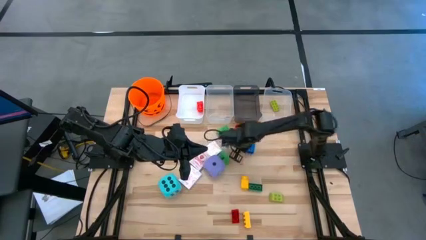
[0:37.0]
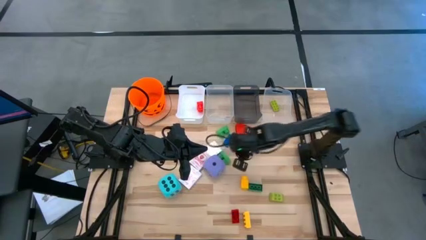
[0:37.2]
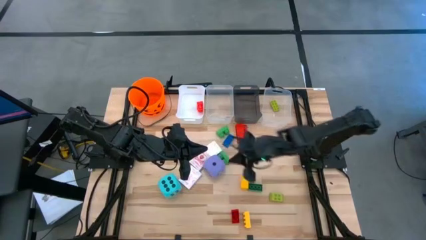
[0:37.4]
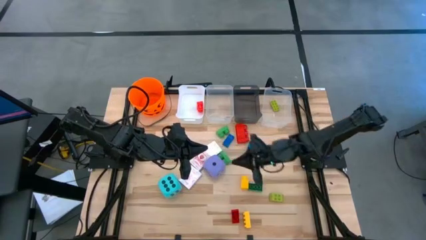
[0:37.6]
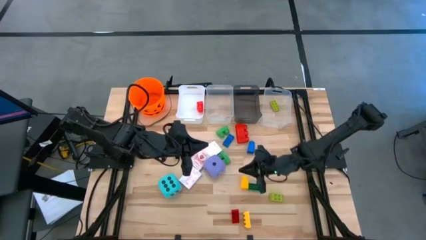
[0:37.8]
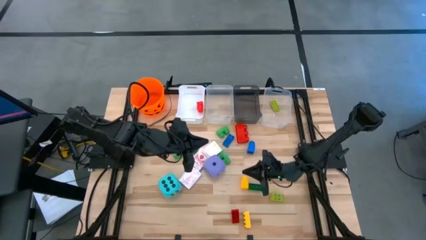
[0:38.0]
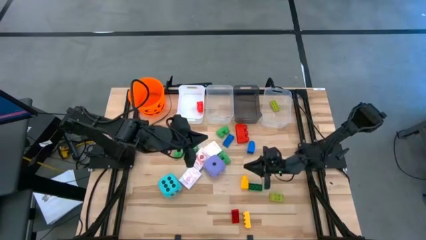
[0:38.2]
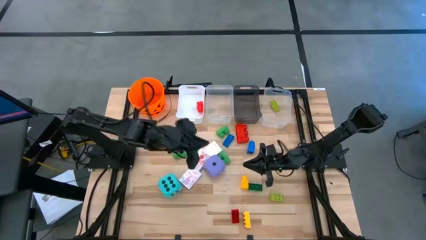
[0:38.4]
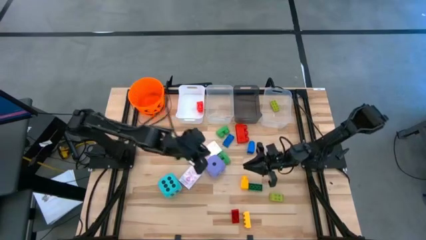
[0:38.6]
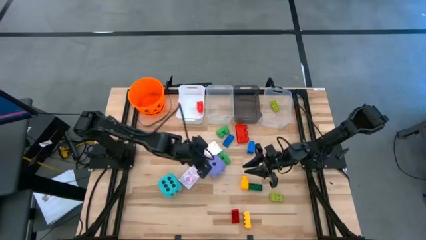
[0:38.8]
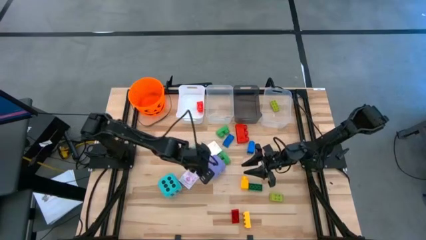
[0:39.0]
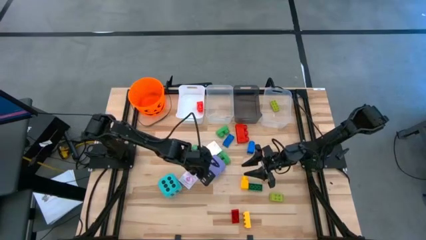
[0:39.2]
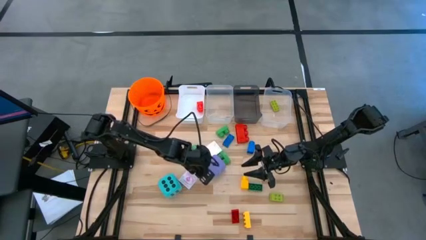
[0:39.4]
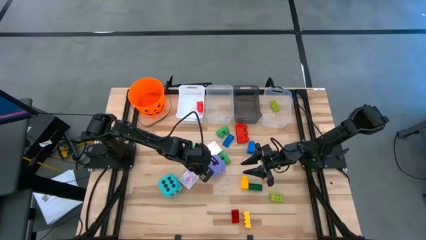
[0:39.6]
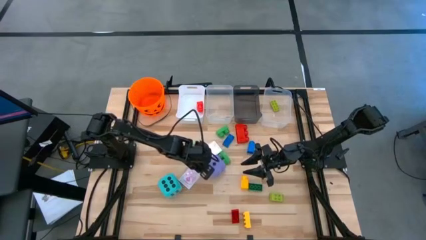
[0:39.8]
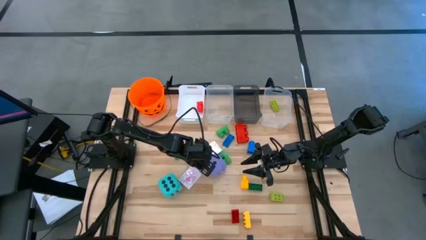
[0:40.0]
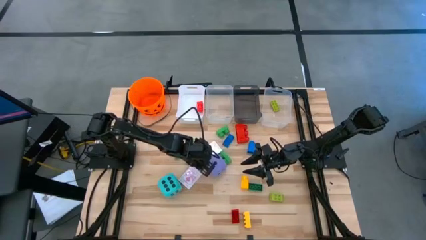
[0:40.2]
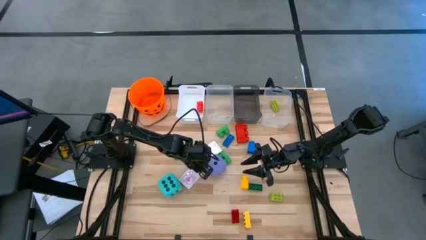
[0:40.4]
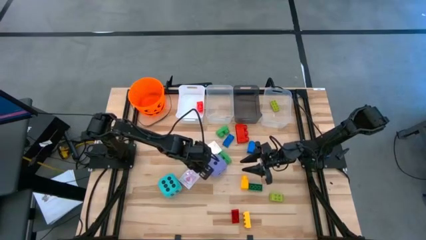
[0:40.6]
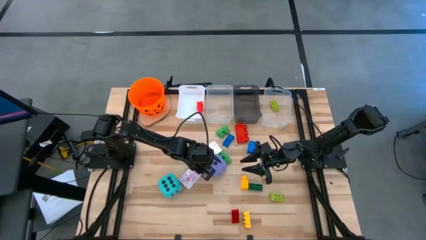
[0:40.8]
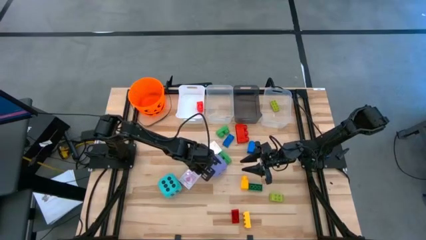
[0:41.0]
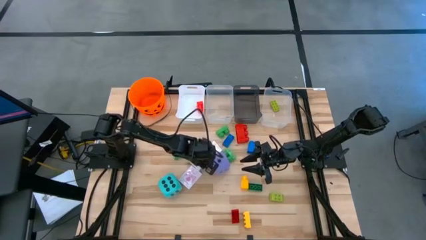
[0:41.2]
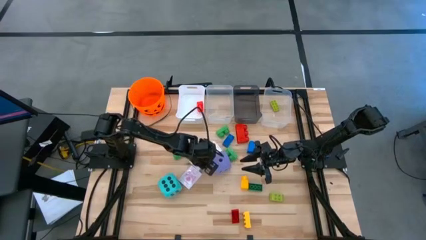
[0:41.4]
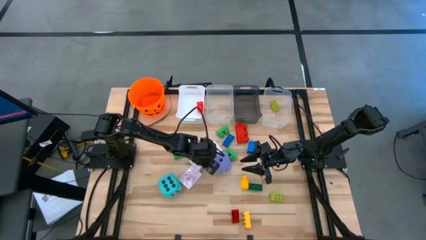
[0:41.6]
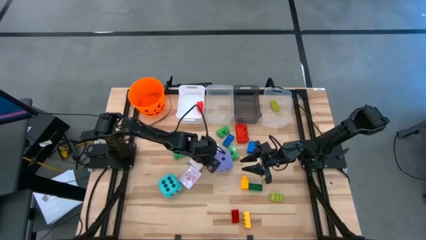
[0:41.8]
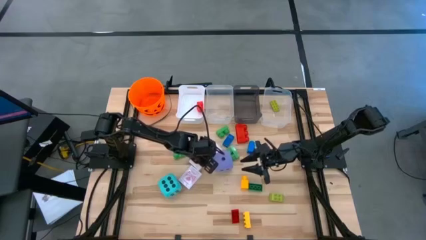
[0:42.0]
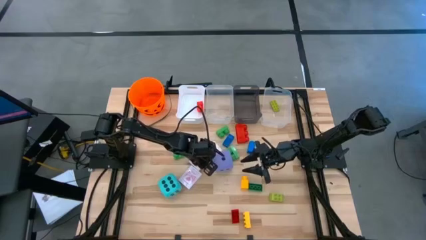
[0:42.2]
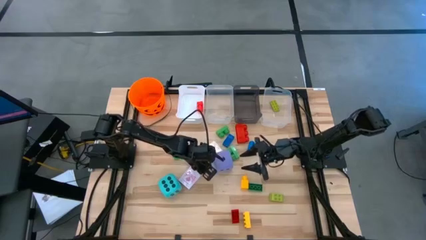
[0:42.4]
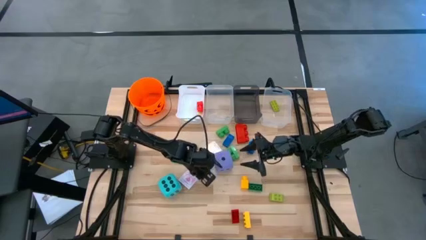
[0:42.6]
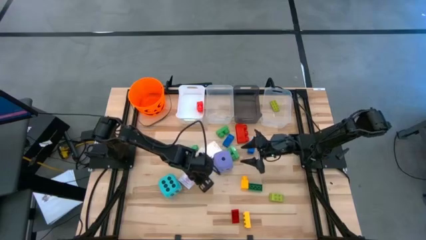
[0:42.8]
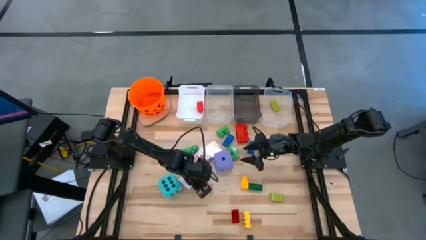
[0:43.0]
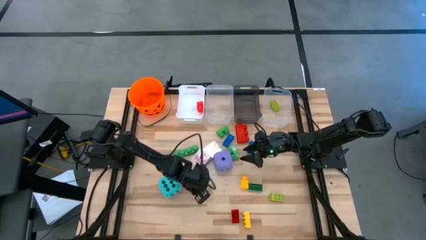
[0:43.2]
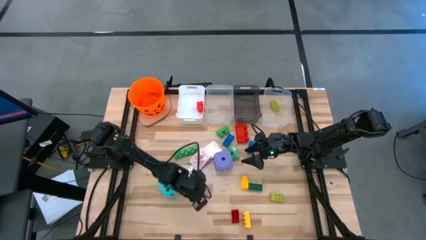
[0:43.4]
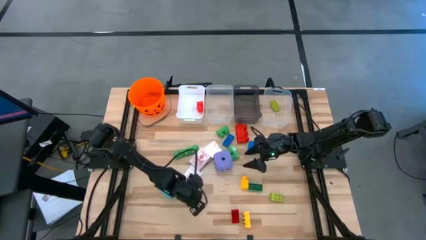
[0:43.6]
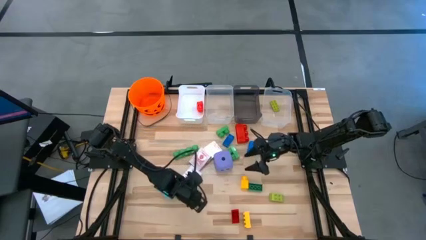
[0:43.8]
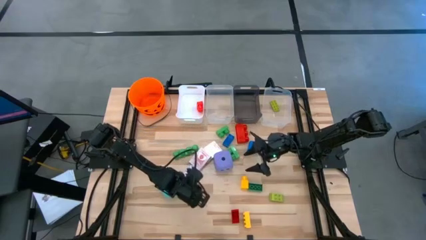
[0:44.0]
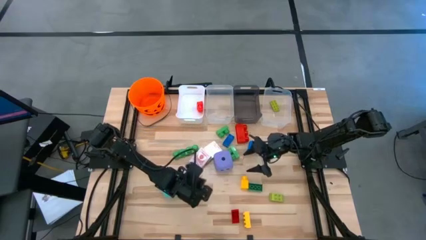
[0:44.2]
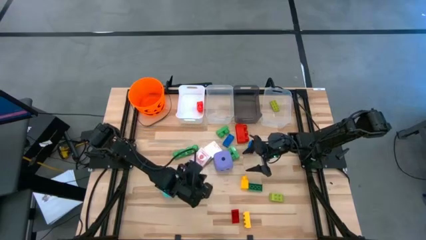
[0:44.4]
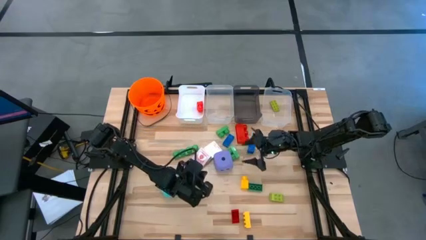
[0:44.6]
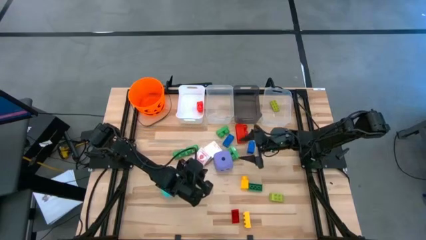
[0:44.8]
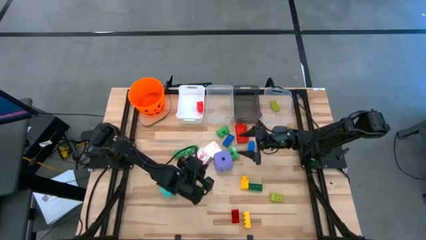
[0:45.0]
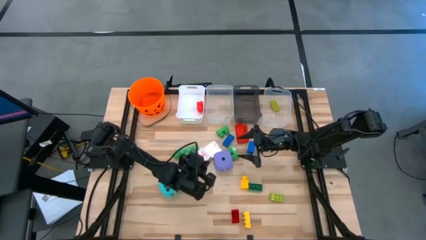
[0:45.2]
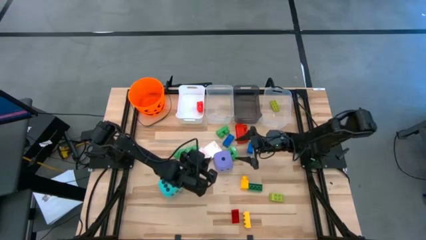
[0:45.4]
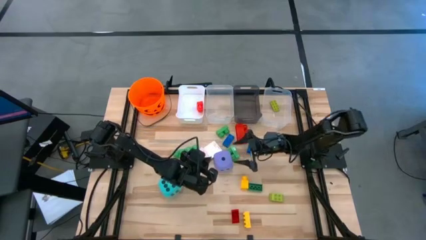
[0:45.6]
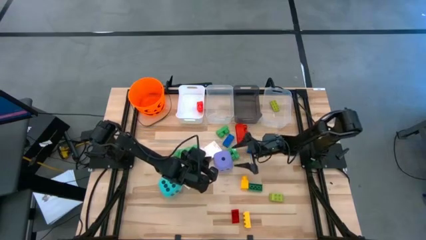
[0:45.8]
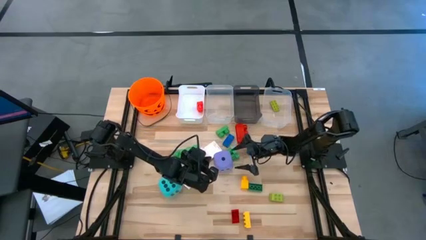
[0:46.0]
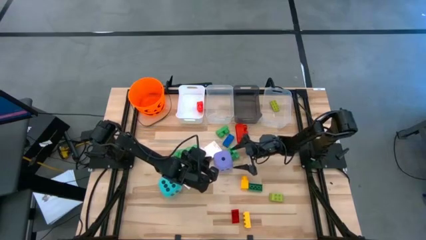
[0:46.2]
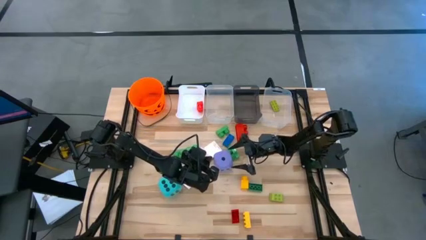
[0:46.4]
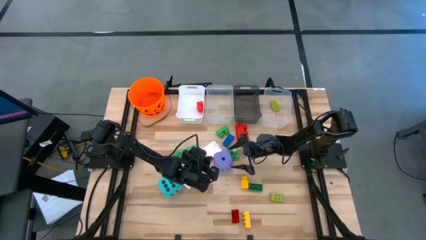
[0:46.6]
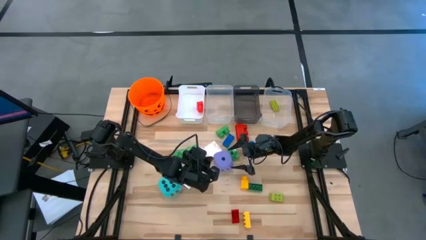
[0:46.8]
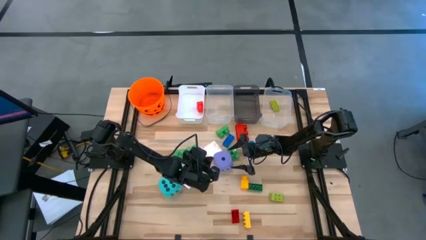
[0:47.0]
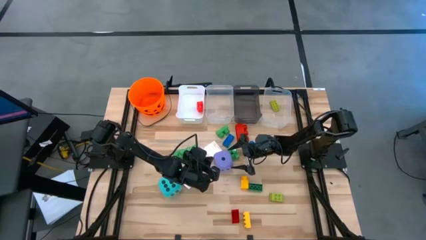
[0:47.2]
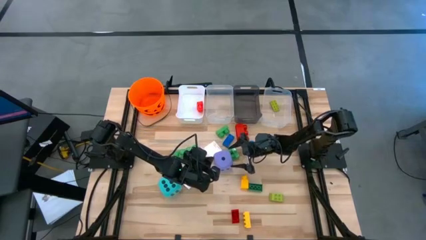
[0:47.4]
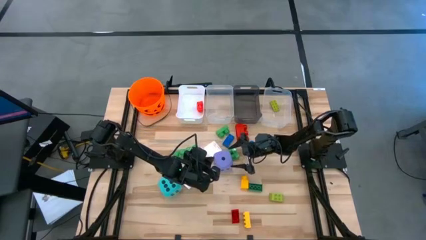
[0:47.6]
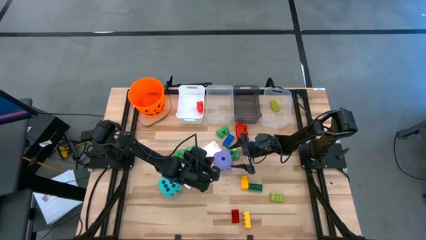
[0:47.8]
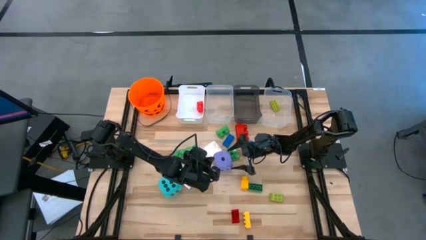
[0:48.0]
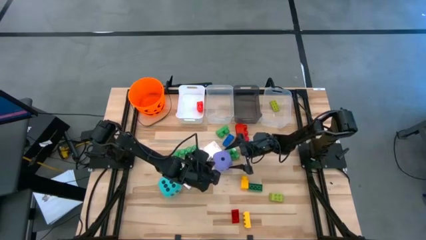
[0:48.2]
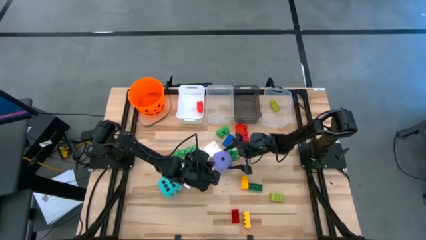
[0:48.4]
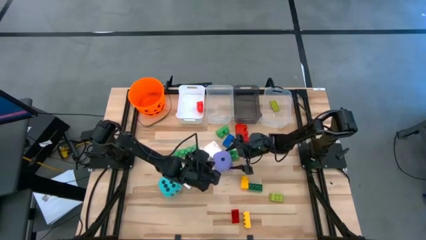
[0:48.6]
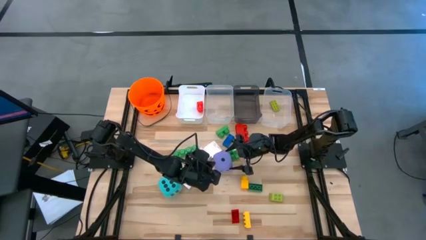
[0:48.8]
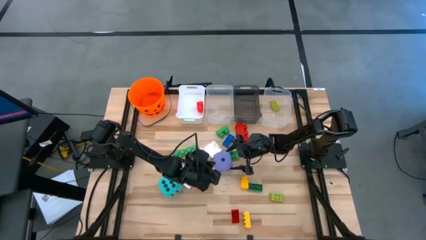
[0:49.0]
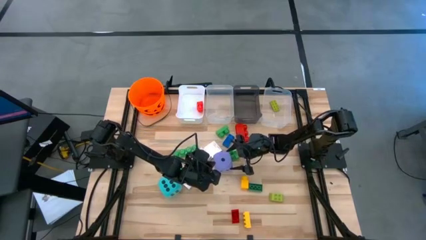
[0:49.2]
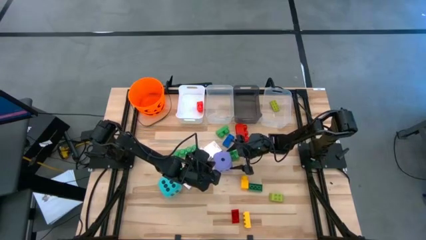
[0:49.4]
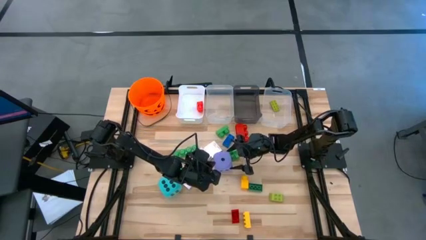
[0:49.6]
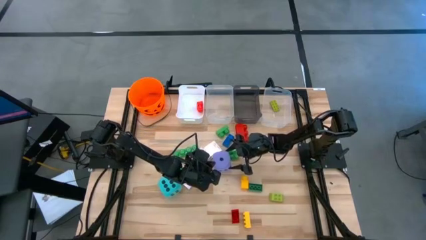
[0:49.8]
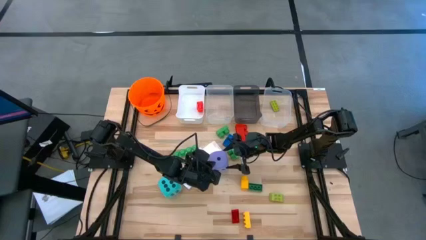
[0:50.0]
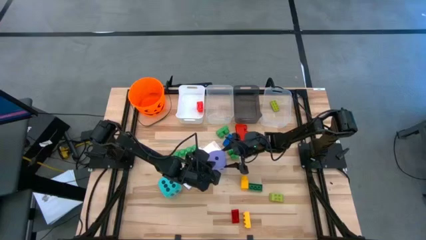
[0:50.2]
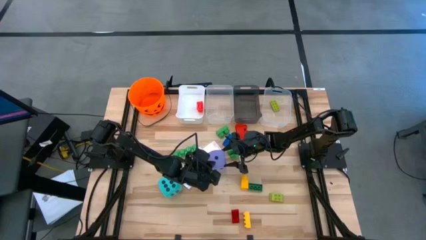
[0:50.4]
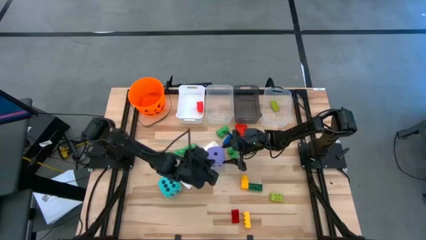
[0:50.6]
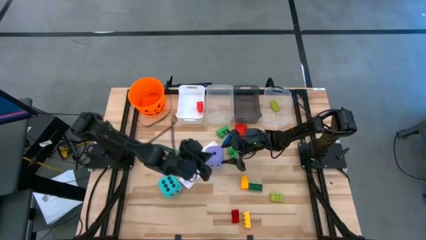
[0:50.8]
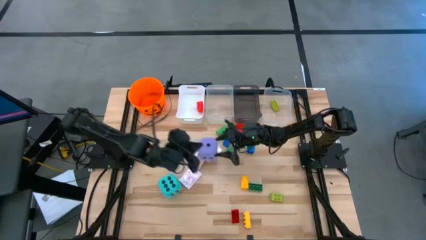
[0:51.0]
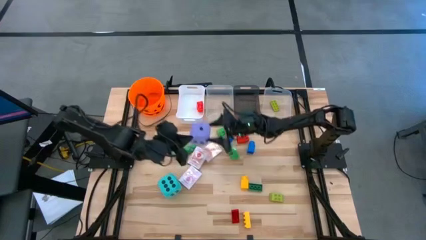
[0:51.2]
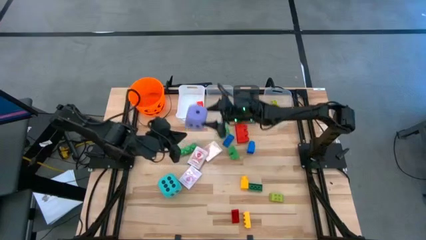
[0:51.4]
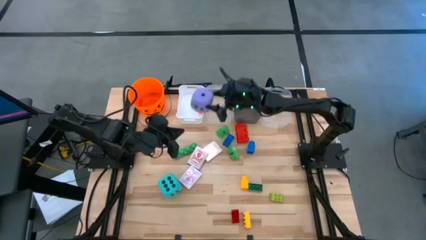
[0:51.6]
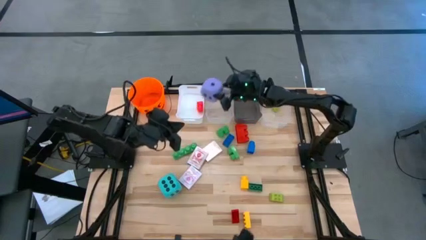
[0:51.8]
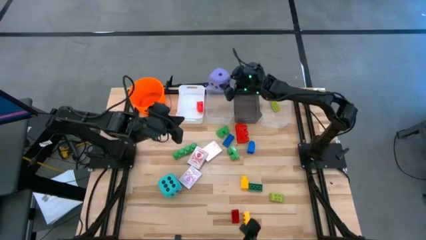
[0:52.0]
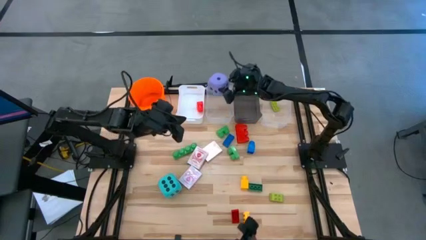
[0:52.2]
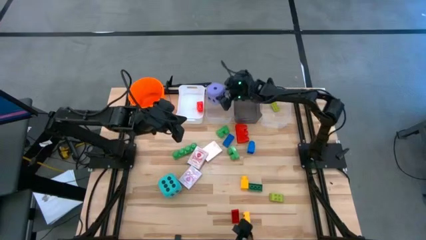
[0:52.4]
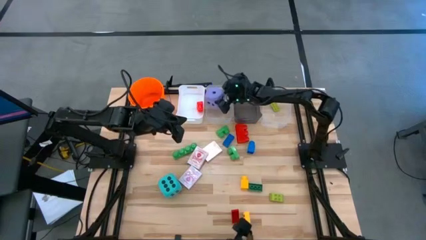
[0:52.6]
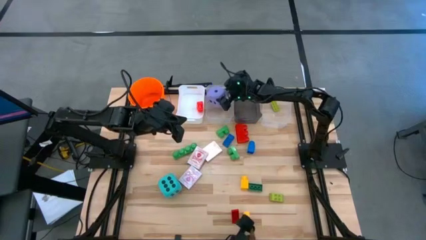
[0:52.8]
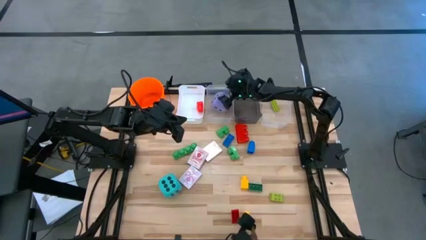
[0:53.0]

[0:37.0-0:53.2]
Task: Pick & Place Toys
Put the purple dice into the left transparent bin

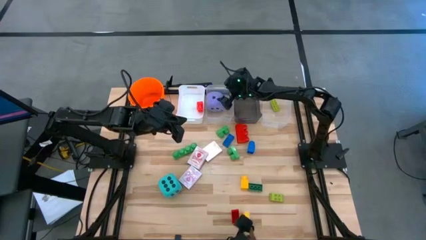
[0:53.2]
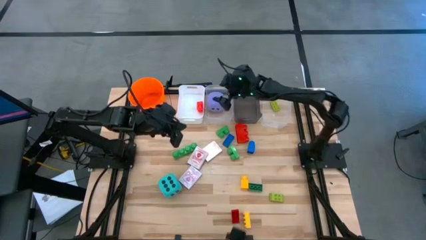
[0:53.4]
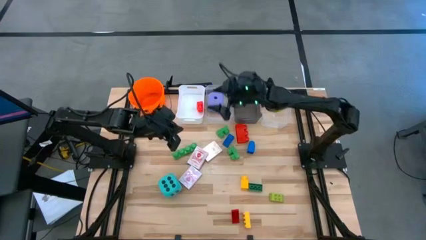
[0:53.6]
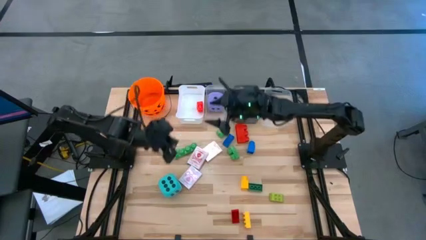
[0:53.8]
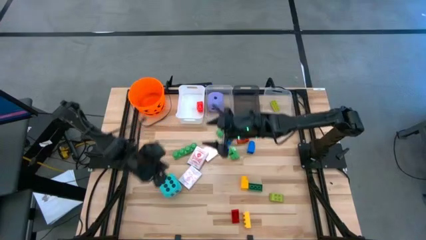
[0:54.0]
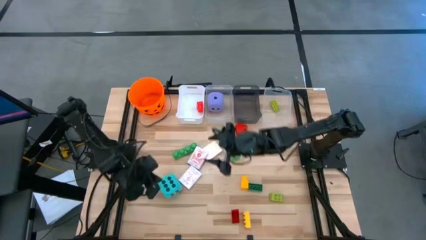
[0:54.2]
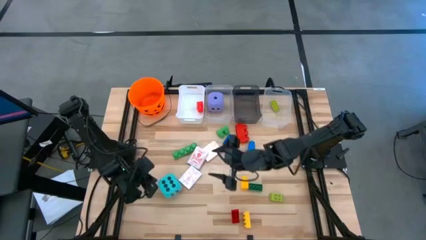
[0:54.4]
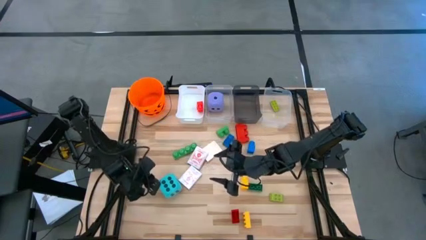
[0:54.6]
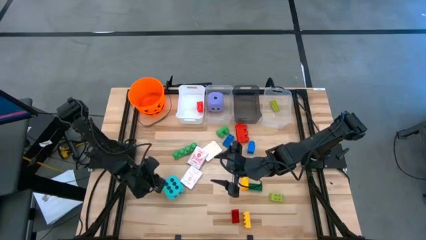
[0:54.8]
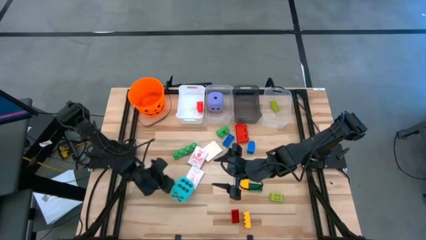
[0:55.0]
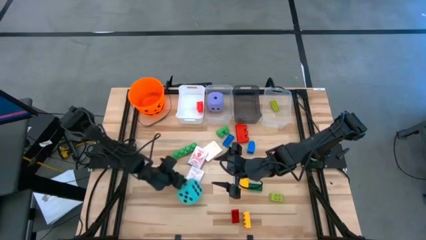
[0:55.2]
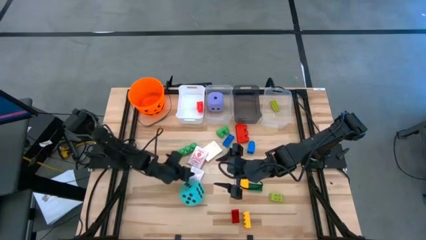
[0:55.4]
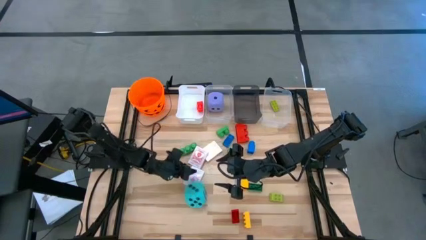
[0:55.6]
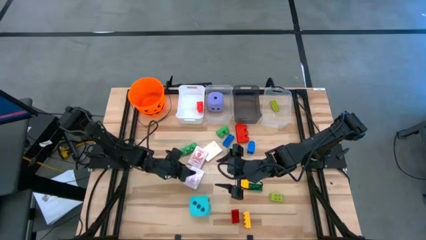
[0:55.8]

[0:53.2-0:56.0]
Move the blue dice to the bottom center of the table
